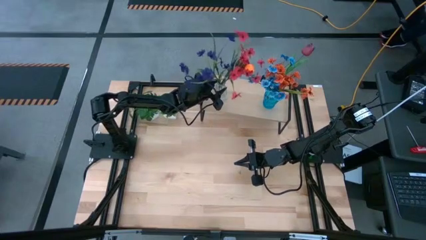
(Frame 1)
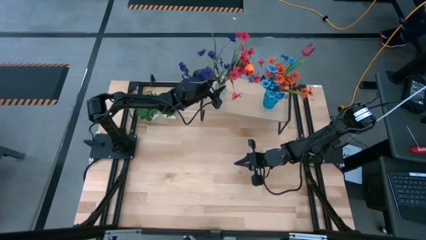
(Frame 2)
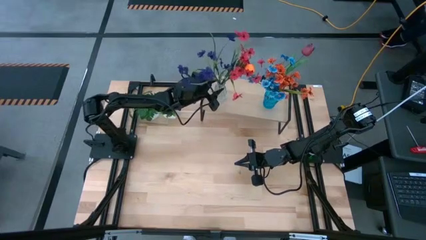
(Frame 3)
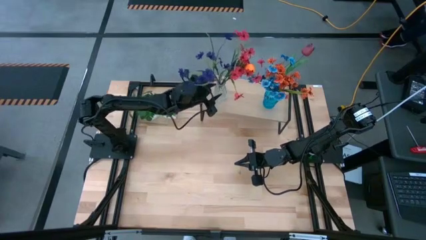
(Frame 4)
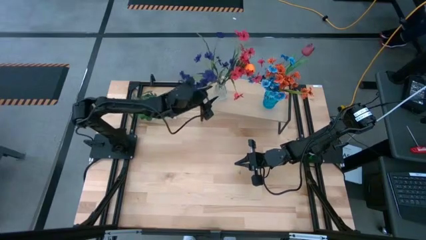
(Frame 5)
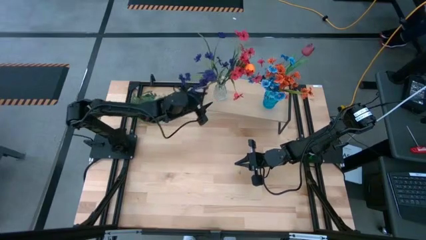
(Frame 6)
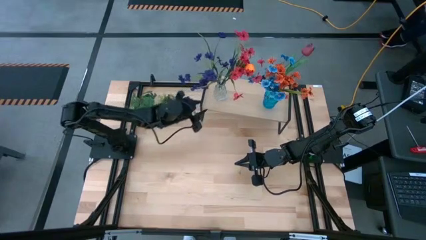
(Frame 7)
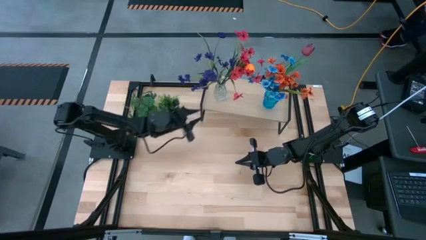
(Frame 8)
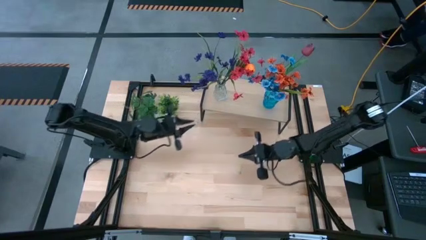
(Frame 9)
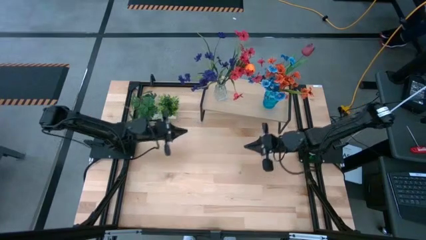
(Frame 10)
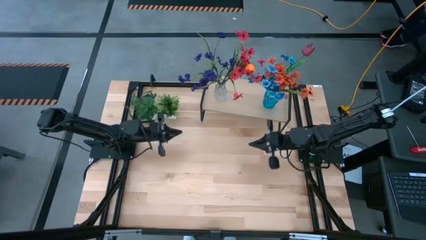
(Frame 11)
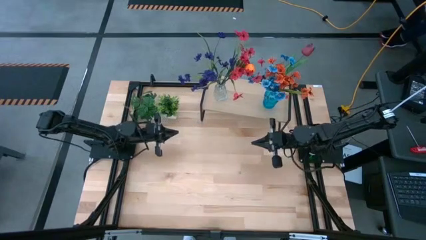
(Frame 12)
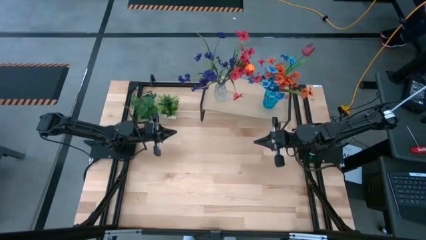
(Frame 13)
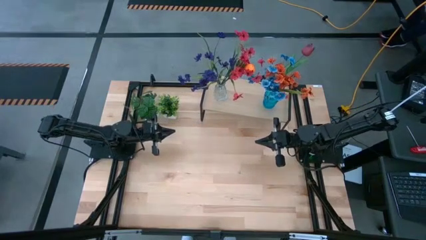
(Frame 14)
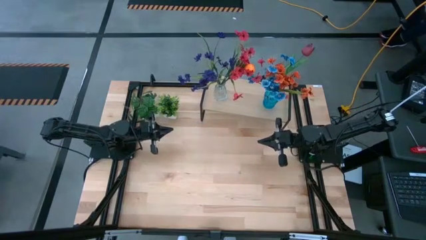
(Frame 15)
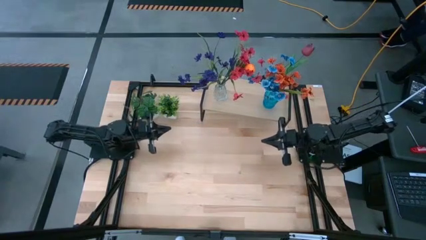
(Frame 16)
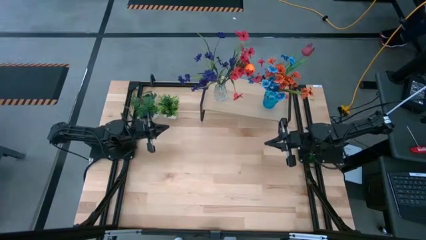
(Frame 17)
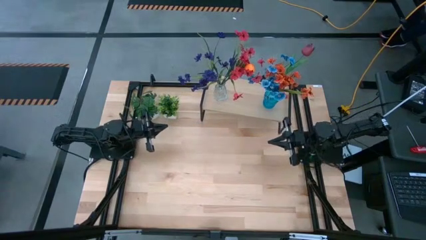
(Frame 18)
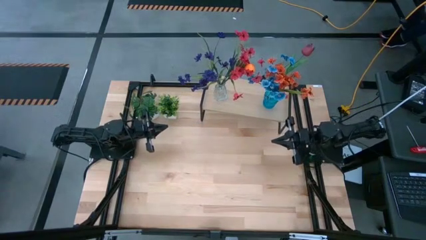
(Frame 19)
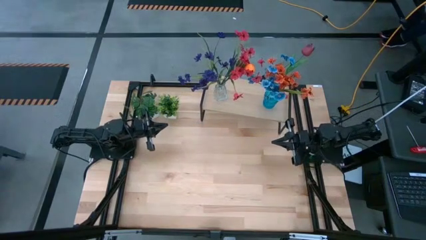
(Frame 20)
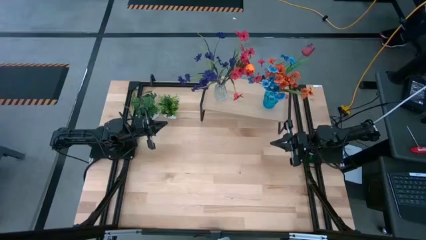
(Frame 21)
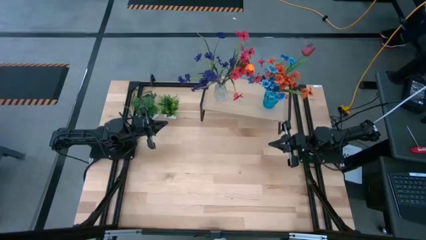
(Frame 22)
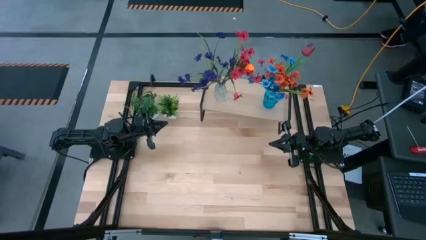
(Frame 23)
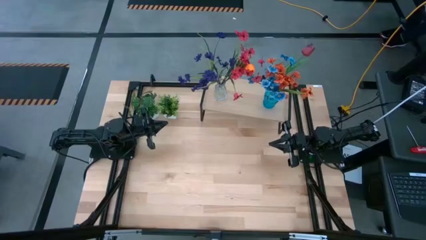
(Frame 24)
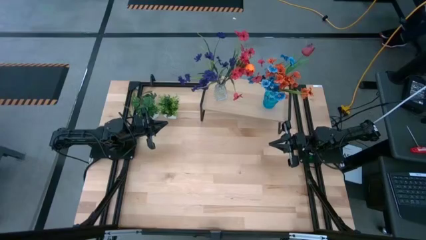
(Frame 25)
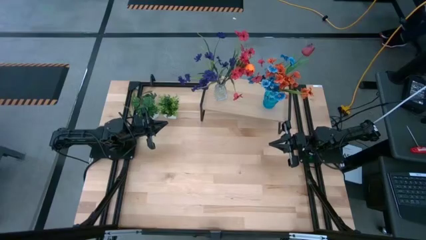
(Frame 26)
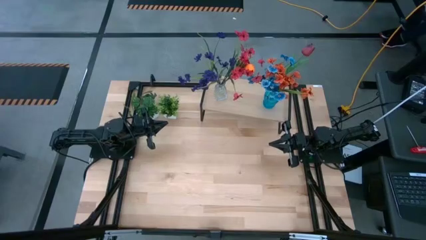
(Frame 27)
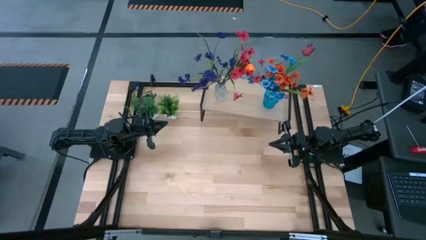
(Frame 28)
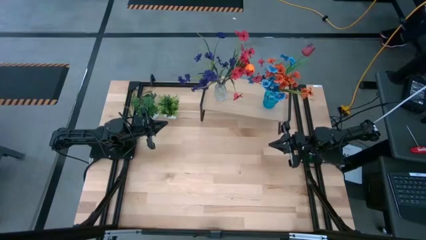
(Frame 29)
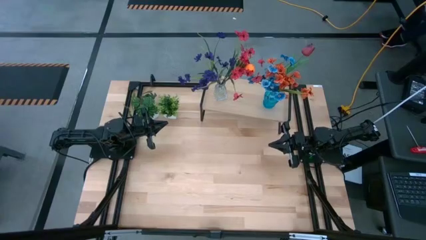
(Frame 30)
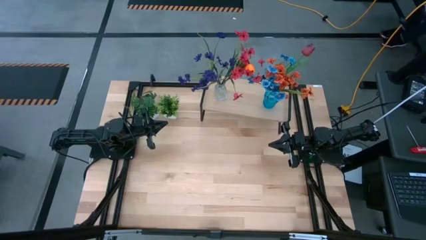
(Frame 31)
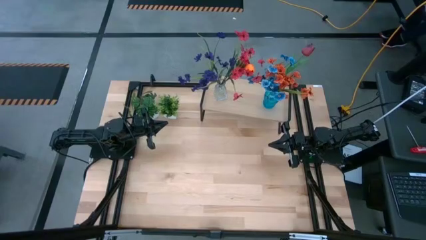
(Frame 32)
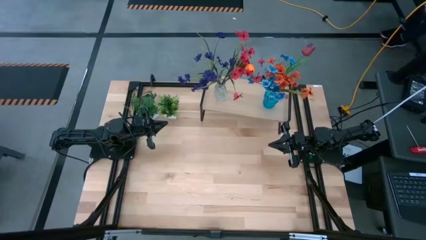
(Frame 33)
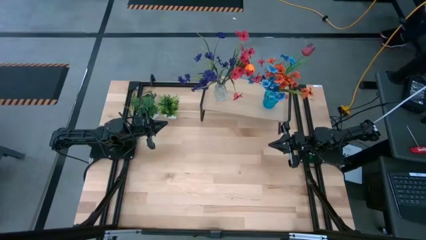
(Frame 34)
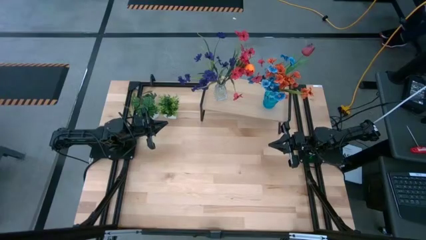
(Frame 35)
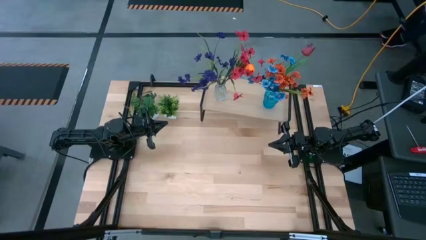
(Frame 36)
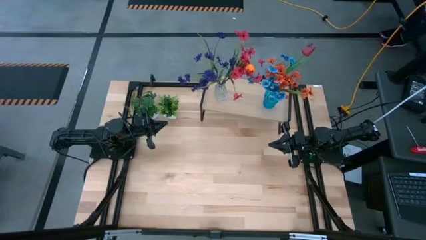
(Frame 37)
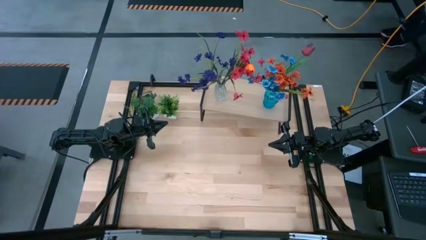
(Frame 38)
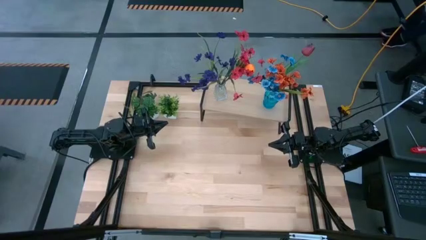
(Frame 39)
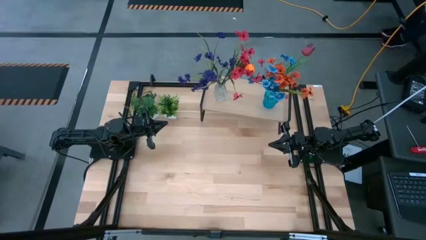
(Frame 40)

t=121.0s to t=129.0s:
Task: Pick and place flowers into a vace then onto a shelf
Return to Home Position

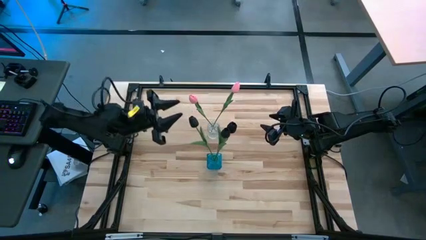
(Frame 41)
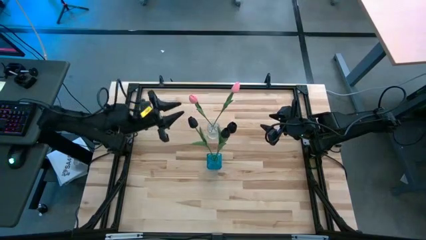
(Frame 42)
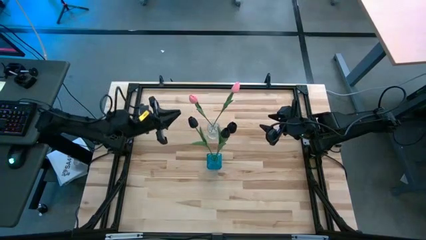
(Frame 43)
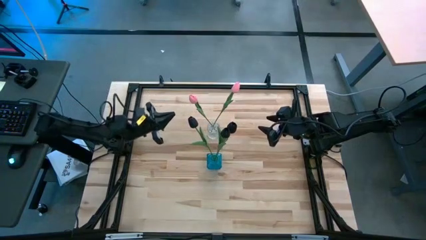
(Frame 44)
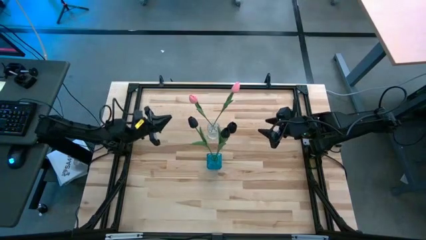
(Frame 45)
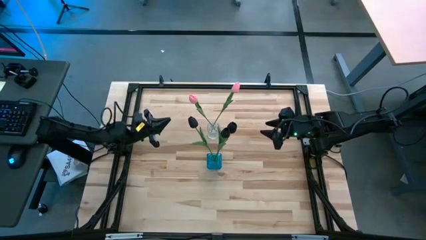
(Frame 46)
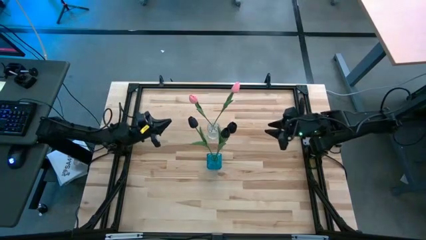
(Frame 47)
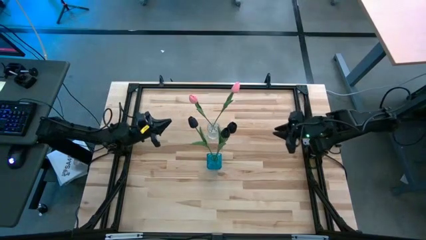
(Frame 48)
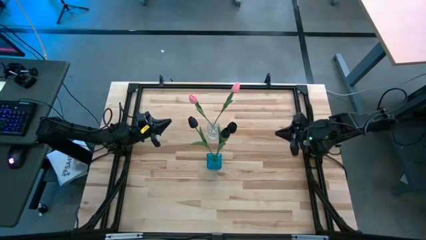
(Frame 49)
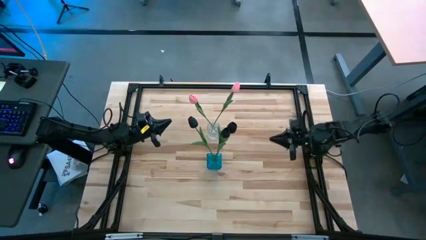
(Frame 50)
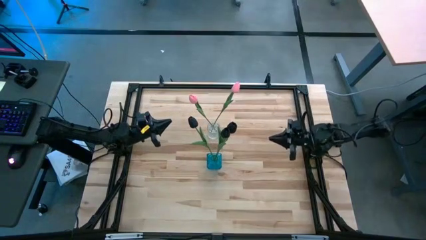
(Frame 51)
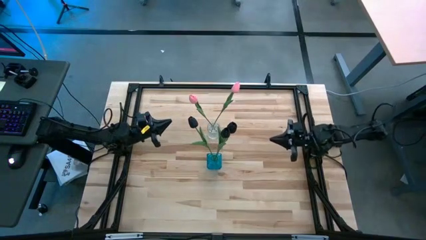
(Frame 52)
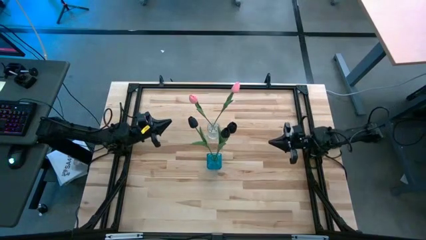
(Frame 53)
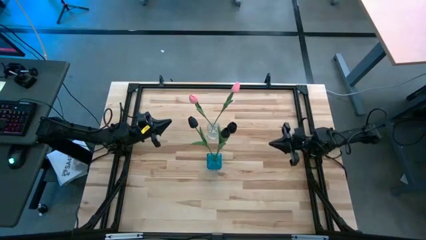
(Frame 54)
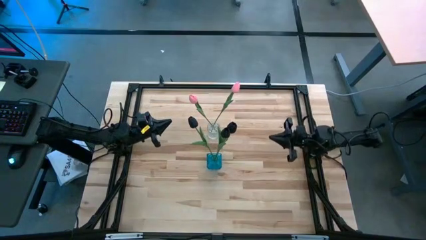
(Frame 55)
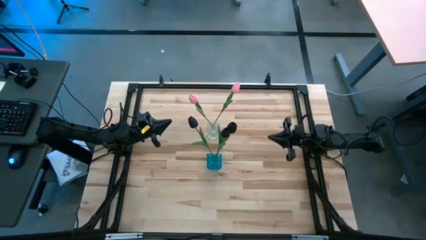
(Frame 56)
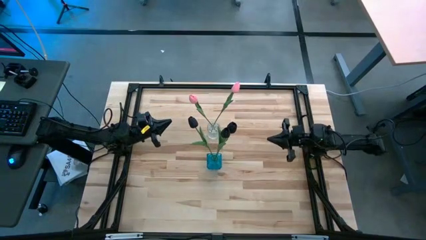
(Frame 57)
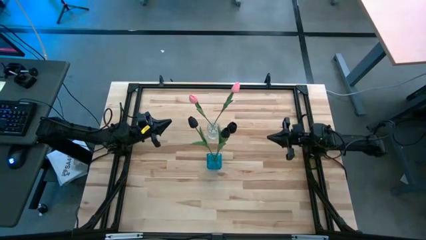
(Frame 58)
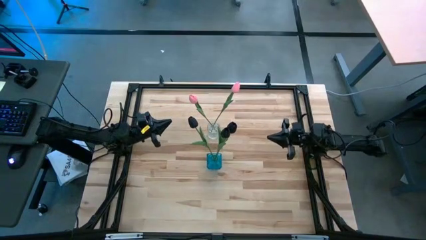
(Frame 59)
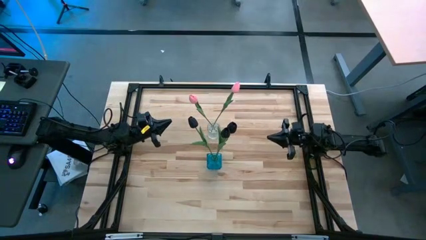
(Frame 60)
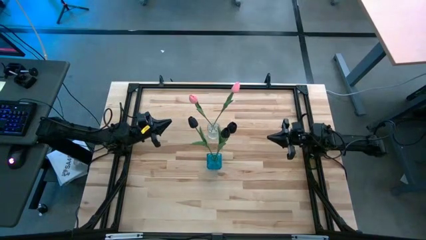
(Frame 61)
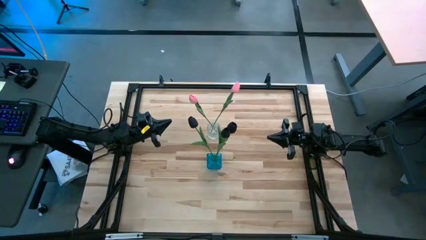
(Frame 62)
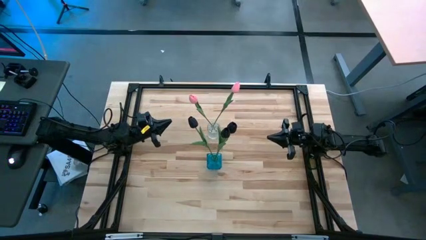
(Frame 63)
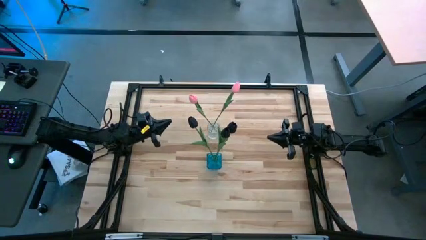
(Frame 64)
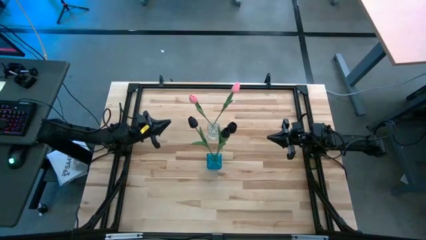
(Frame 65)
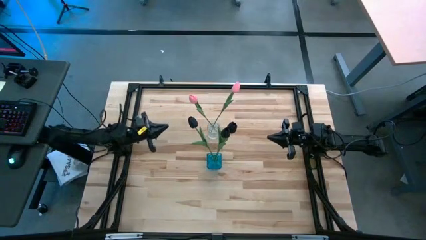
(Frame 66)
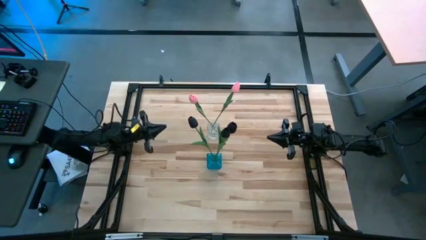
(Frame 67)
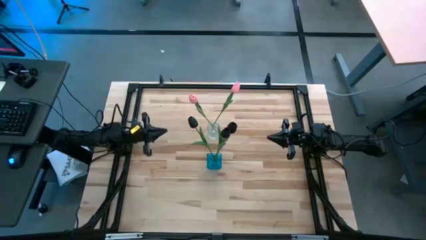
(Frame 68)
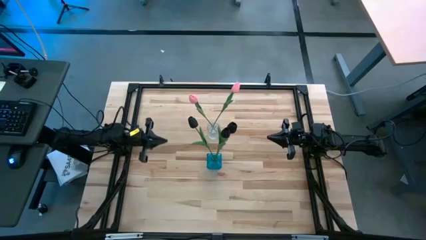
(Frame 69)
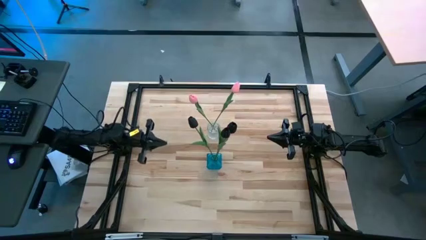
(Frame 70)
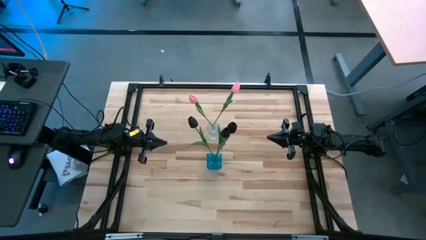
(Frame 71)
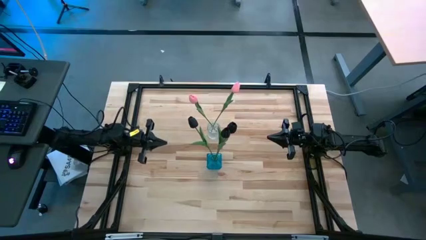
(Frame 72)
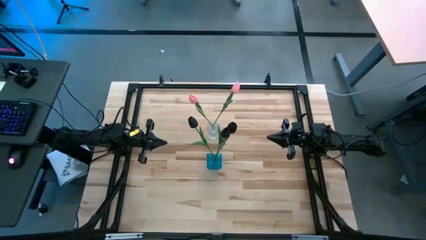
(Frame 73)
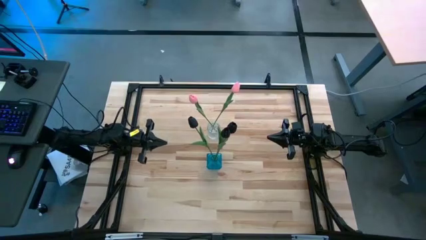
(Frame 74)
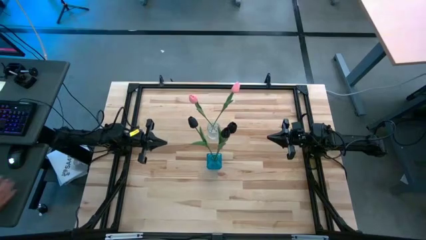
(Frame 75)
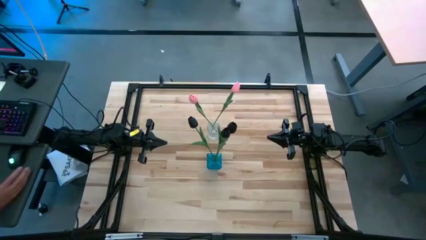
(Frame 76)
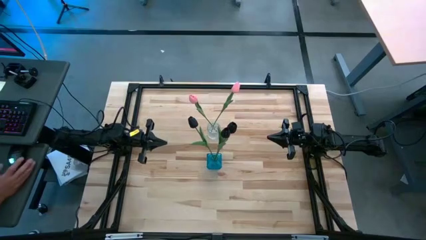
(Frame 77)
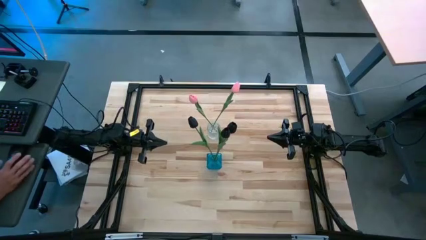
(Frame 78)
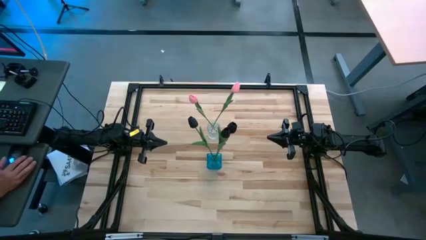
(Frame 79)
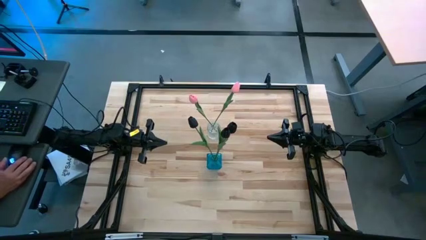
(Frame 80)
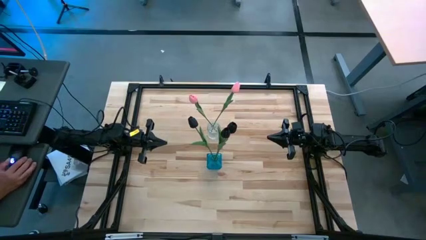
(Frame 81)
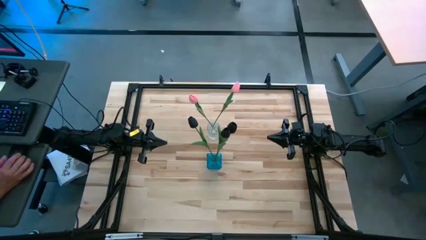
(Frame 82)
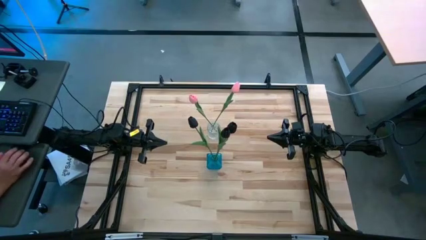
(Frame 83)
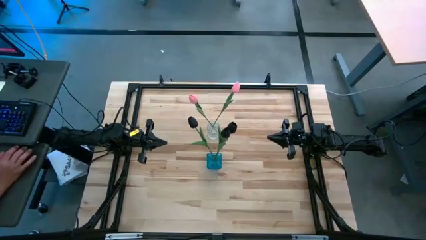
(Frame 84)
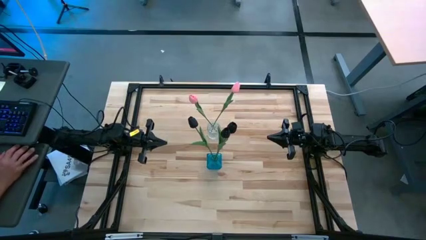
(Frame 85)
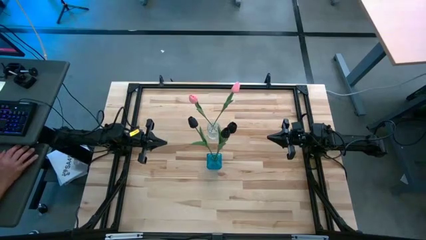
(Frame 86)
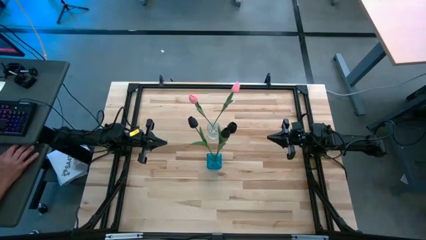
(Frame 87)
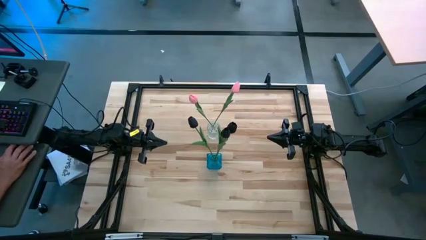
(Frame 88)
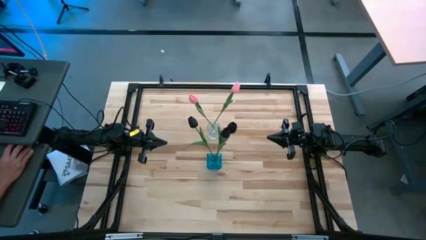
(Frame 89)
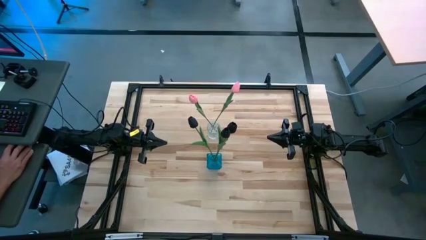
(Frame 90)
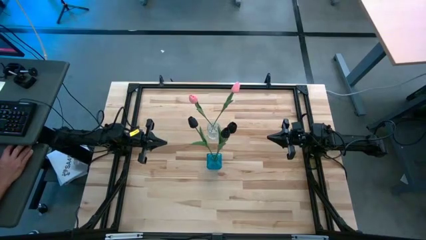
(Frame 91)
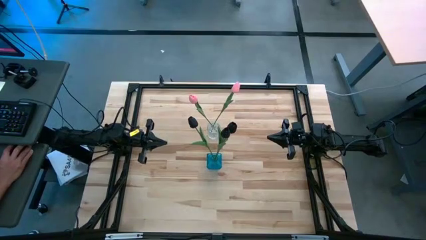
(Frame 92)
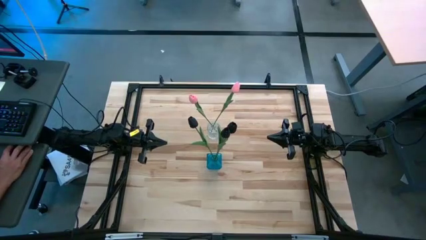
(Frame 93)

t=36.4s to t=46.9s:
Task: Sort flowers into vase by color
Return to Home Position
